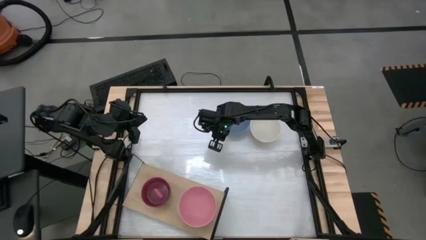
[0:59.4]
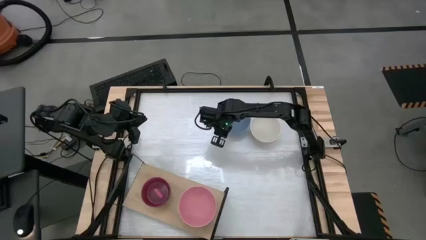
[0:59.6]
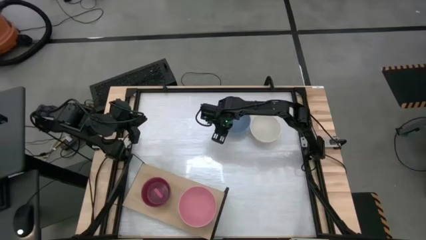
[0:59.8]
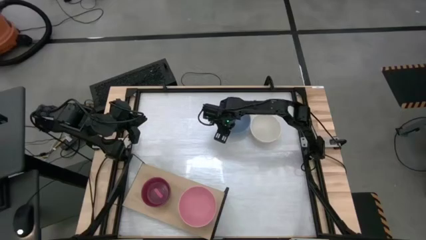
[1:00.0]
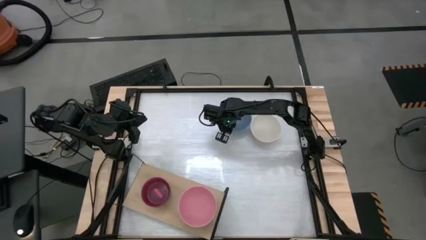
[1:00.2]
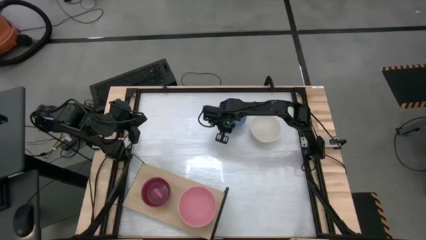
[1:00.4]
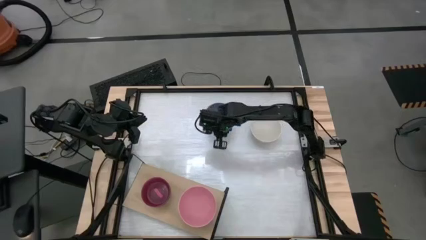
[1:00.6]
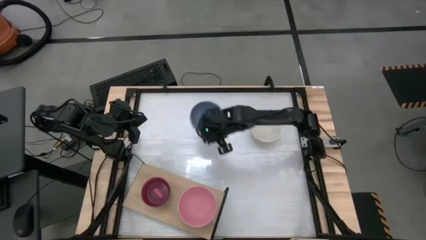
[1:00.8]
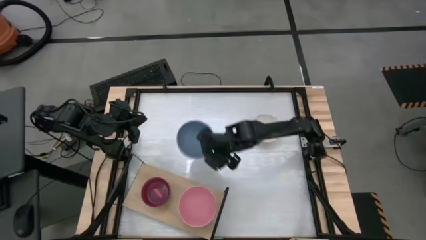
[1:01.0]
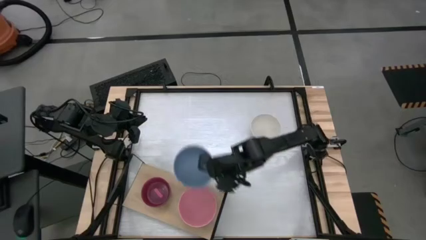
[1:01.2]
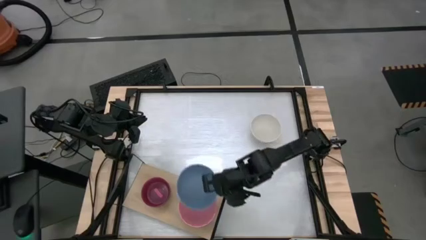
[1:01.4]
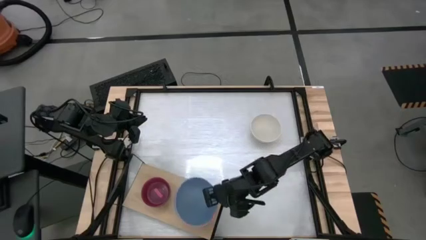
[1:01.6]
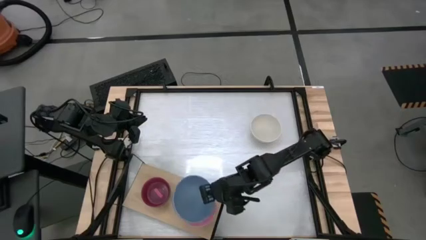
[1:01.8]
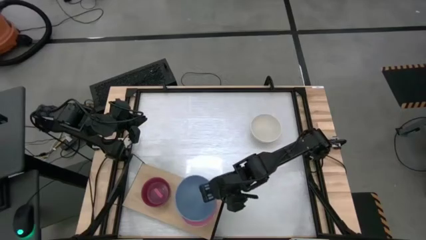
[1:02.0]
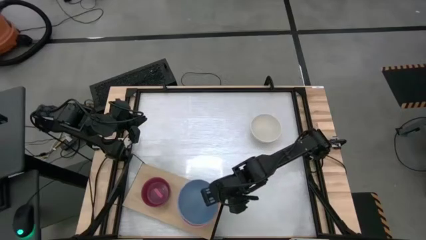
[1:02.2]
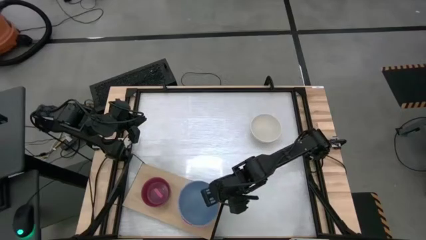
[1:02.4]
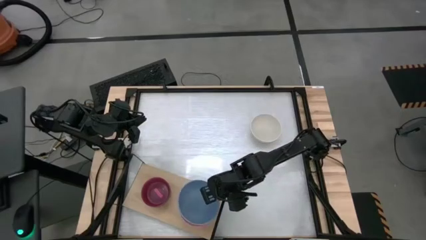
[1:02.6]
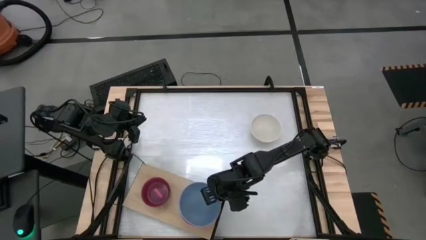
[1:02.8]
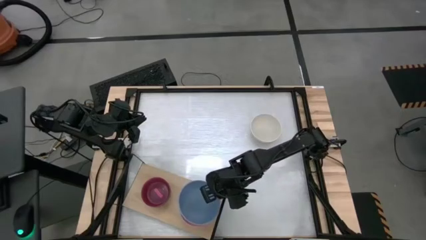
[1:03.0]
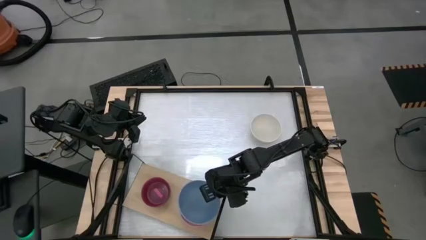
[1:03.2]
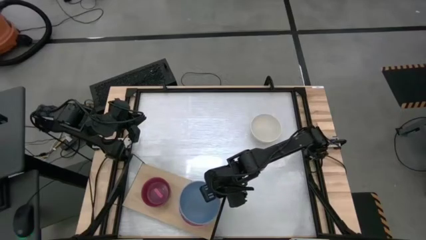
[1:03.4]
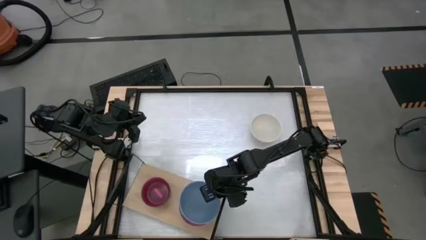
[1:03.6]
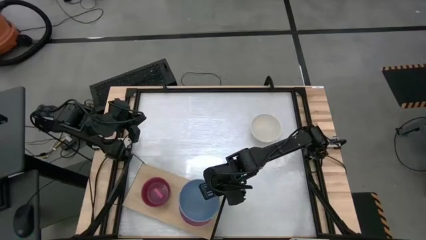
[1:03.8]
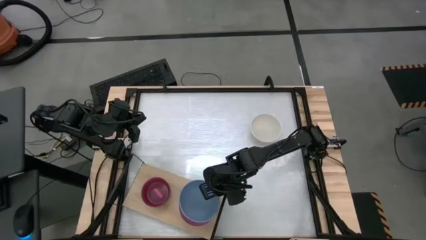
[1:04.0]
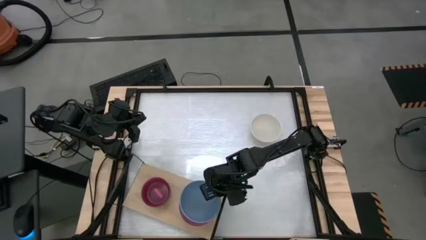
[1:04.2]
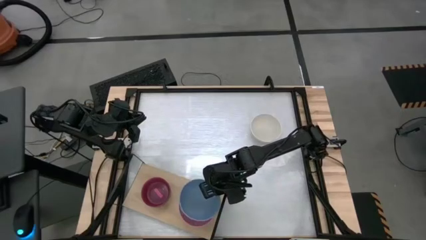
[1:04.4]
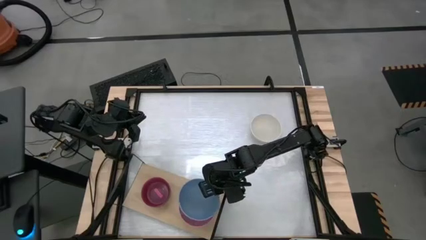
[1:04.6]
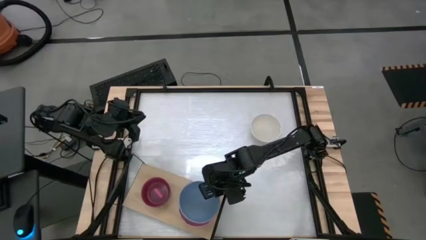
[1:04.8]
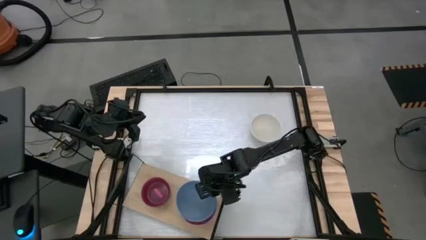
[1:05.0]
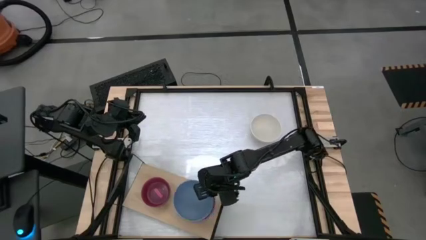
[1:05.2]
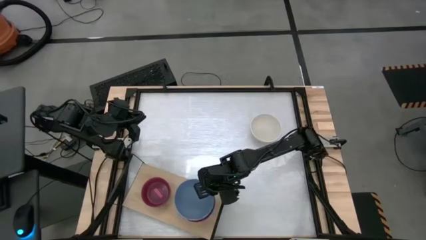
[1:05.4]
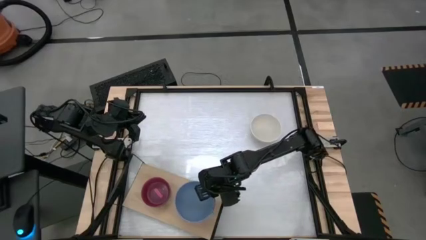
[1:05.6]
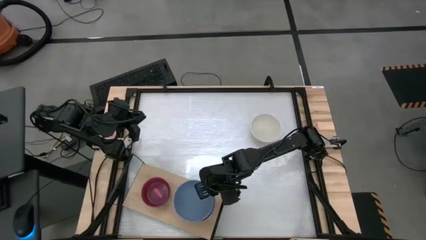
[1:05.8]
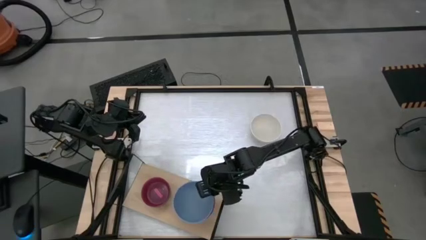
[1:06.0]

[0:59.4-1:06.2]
Task: Place and stack bowls onto a shelf
Stack the blue bowl on top of the light pink bowl on the shelf

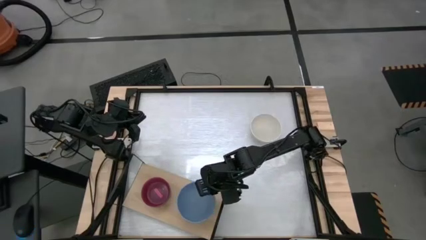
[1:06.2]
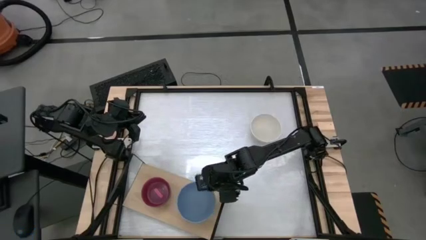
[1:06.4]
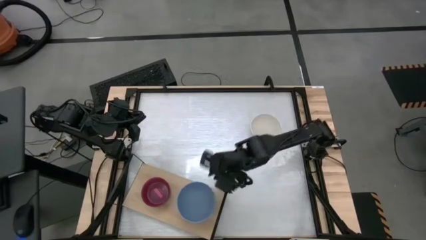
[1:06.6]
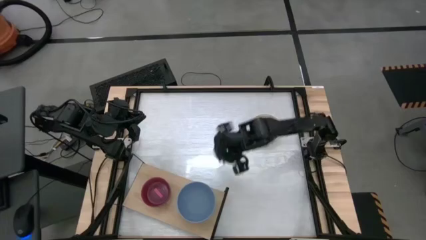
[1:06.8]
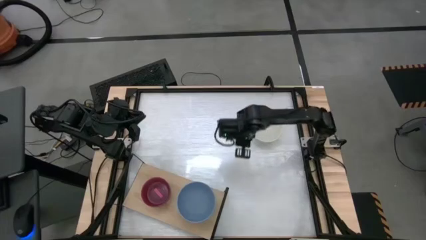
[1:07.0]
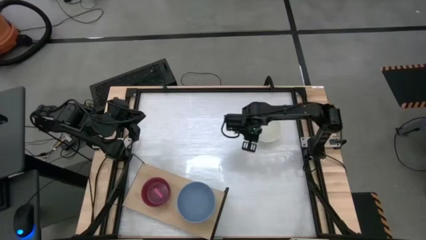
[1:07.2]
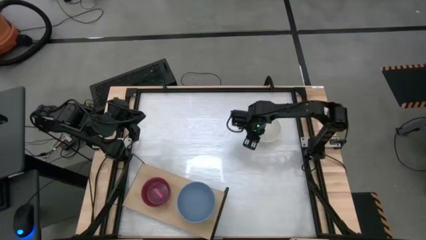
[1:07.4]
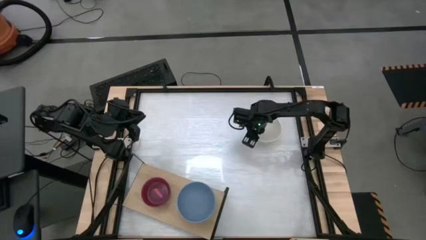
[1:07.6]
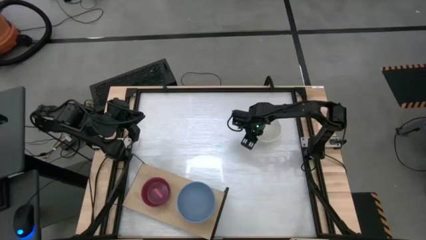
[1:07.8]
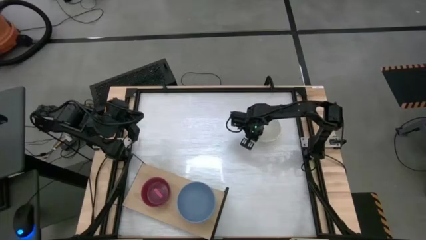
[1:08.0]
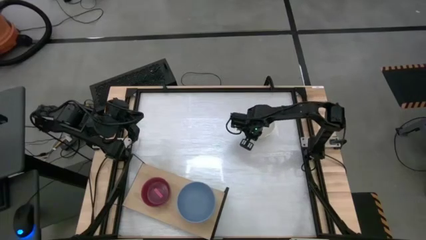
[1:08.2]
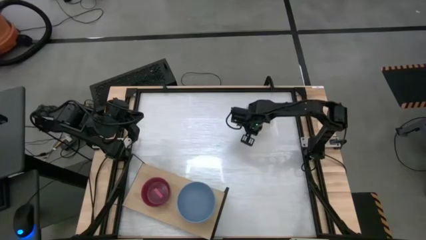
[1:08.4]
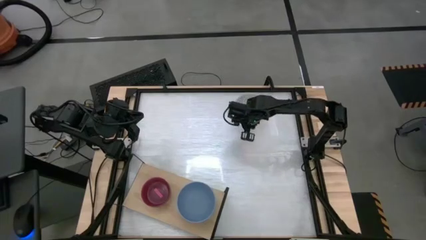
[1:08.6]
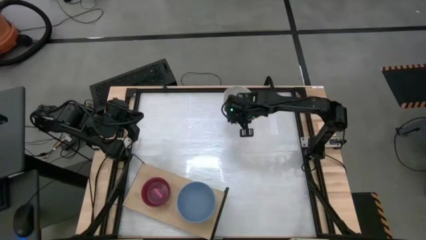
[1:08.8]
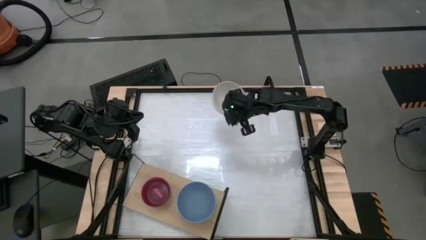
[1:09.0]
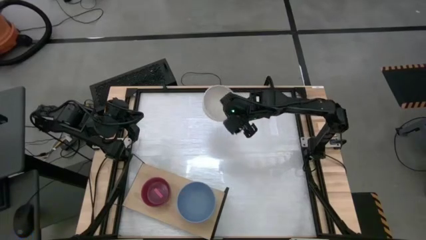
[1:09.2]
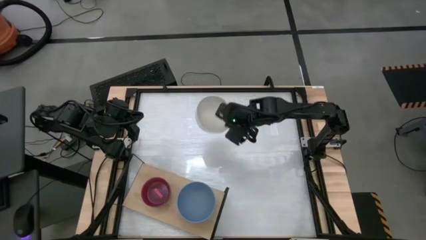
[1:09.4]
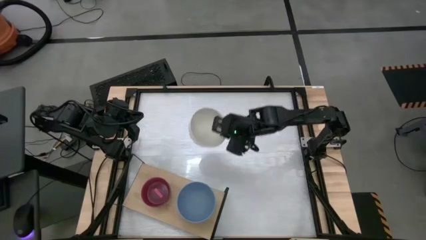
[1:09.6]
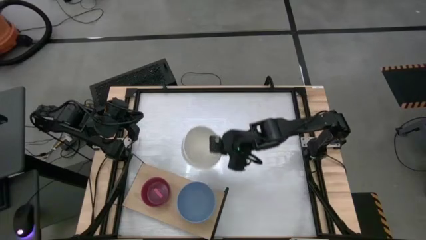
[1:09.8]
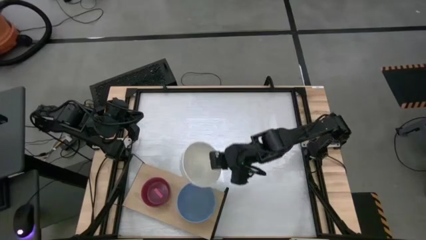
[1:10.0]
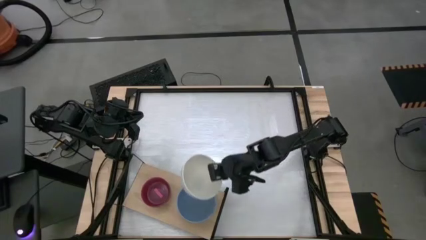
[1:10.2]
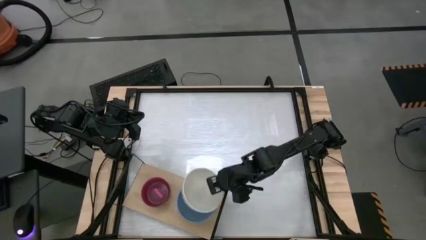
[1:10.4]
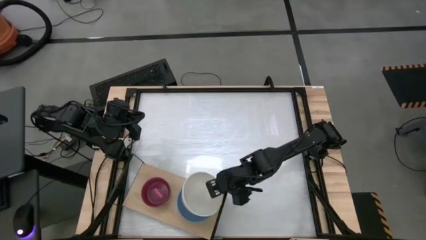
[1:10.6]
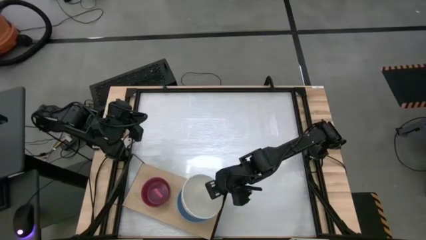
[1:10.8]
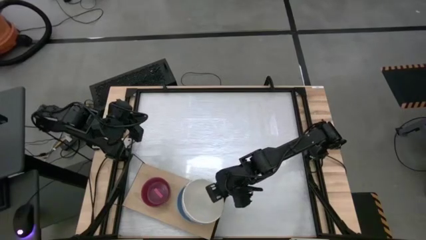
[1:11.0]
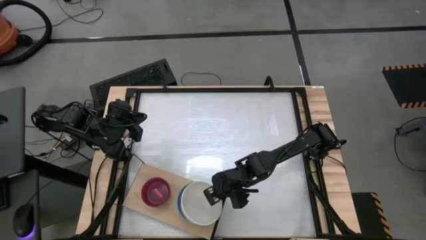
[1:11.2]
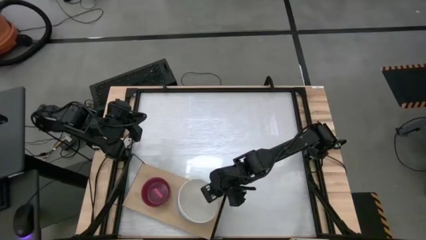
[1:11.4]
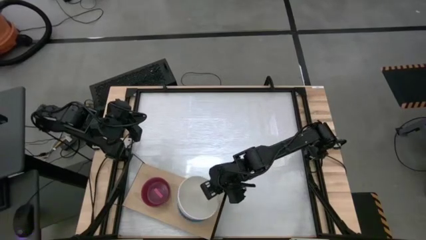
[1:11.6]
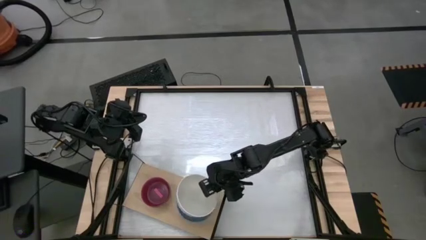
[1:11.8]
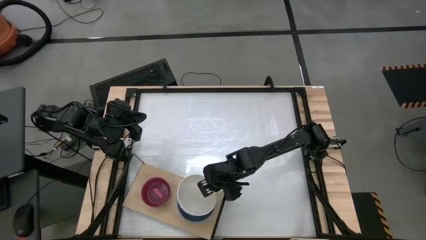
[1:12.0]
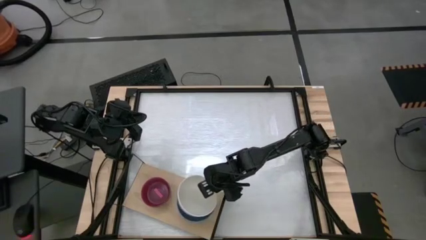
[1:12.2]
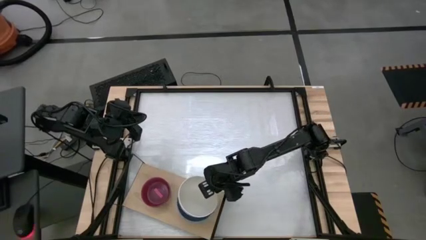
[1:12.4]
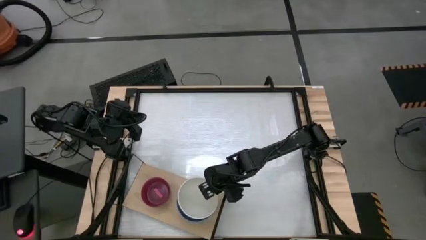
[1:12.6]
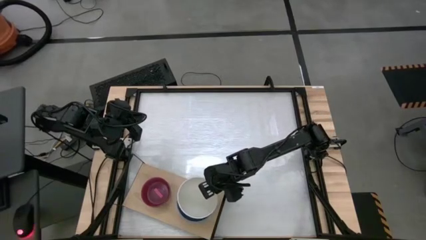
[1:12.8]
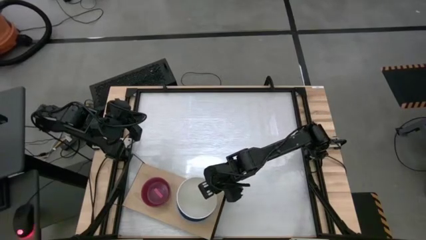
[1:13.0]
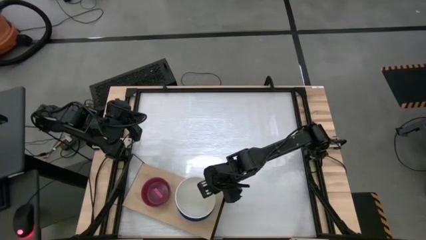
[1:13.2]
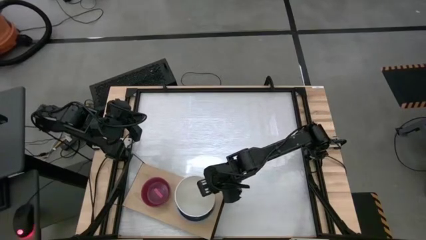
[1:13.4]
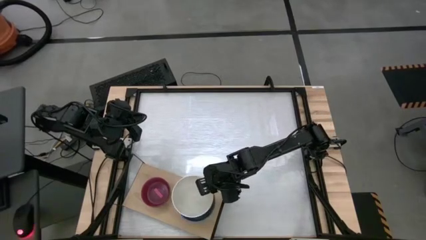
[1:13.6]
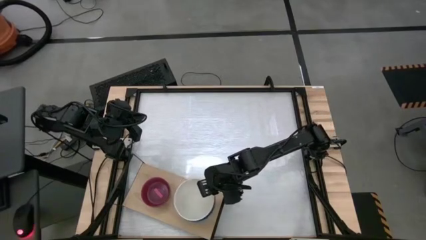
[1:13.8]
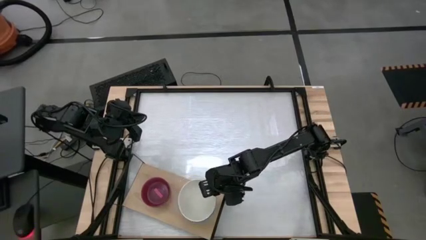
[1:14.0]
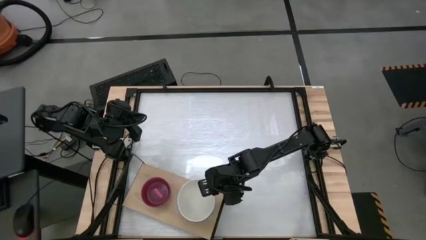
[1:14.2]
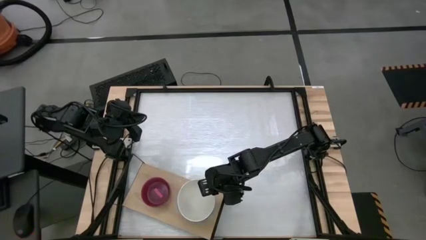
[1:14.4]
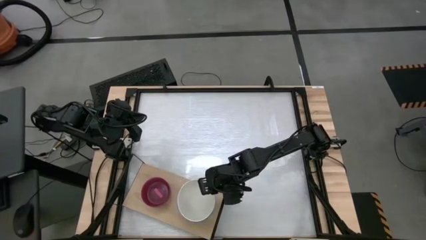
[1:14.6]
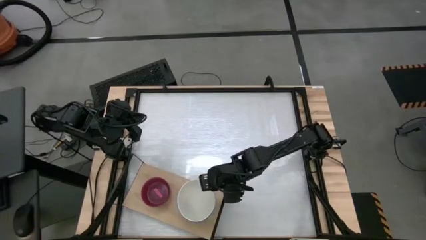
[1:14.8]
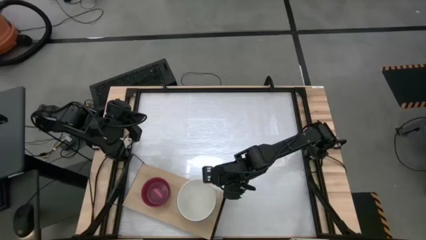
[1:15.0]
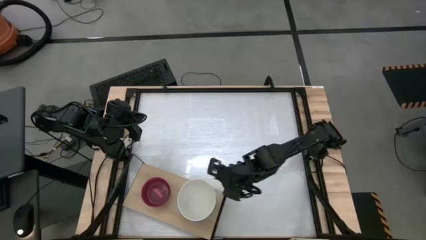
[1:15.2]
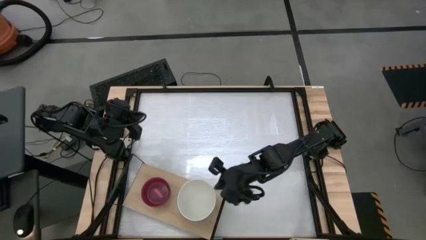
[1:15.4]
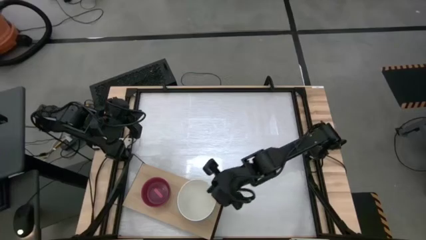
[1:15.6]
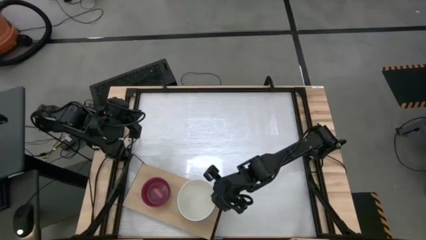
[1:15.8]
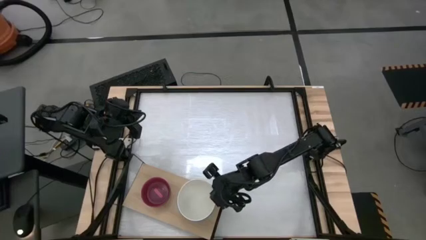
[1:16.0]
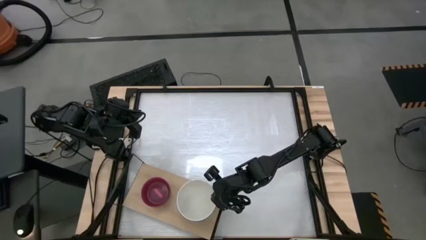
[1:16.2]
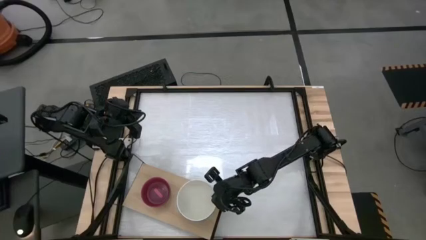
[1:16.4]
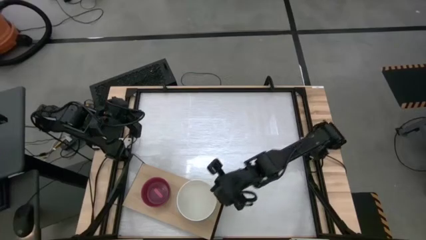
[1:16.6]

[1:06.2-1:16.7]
Stack the white bowl on top of the blue bowl on the shelf
